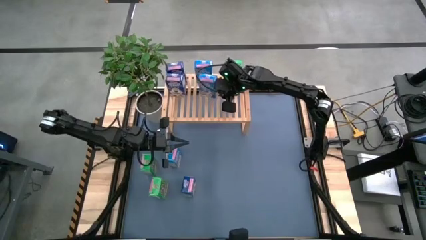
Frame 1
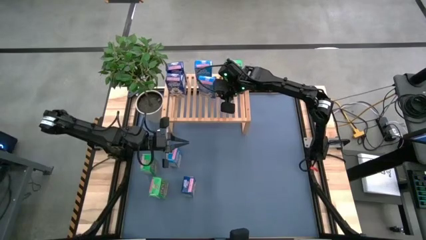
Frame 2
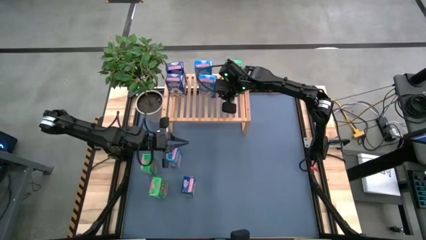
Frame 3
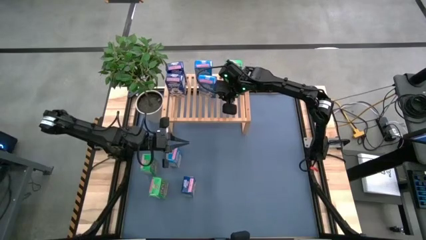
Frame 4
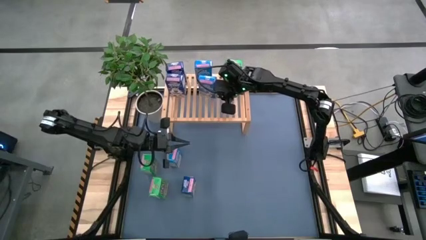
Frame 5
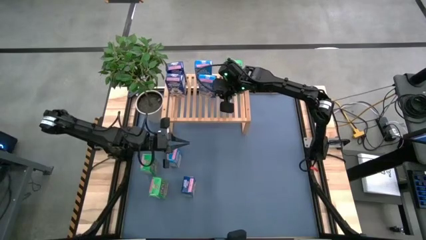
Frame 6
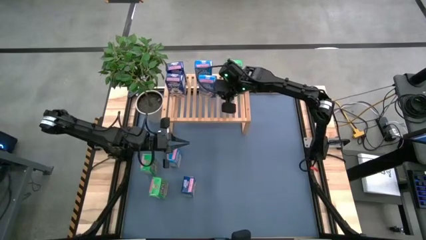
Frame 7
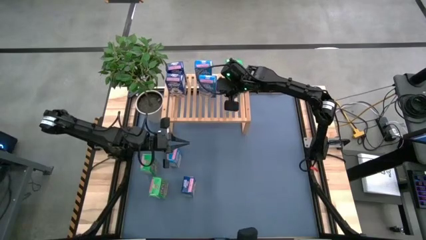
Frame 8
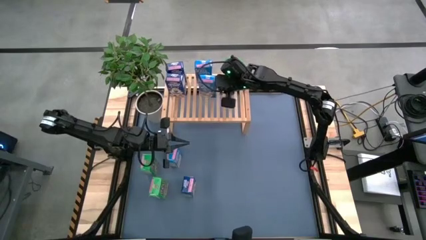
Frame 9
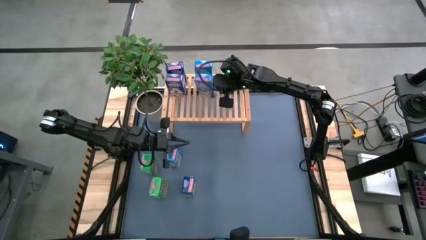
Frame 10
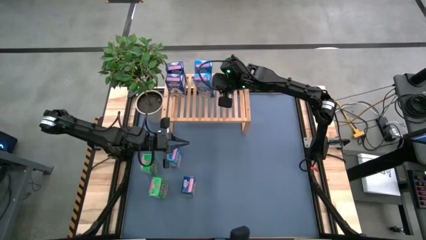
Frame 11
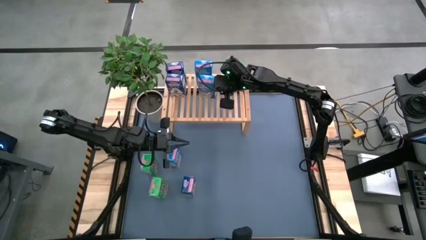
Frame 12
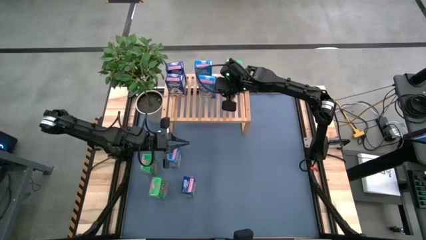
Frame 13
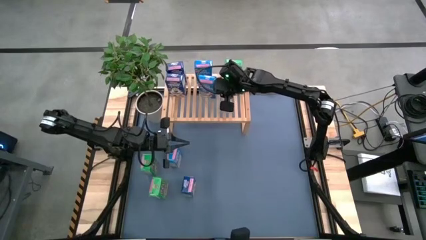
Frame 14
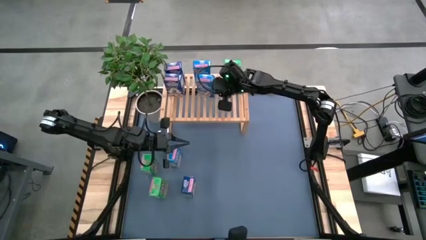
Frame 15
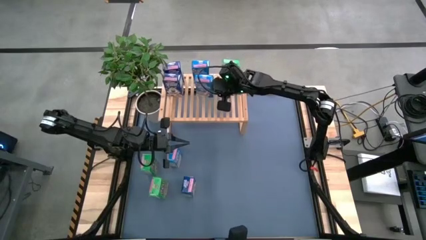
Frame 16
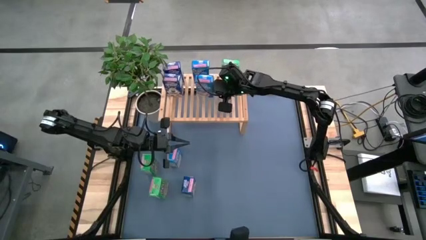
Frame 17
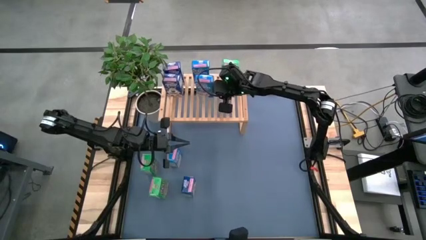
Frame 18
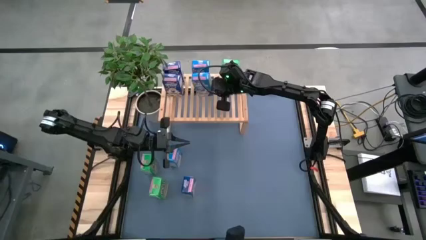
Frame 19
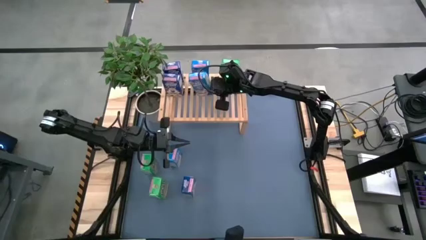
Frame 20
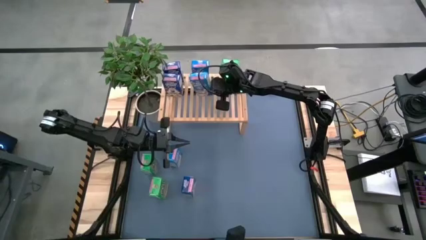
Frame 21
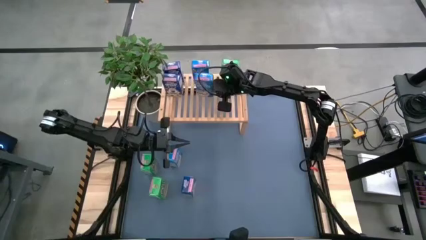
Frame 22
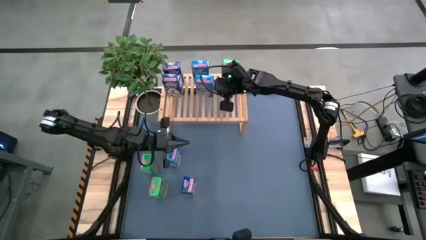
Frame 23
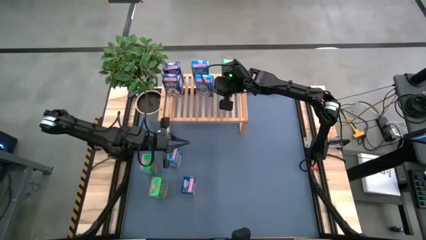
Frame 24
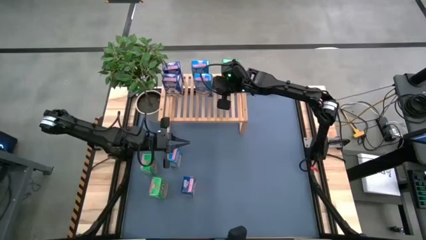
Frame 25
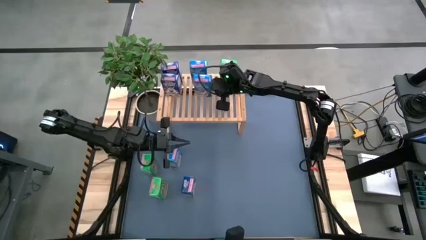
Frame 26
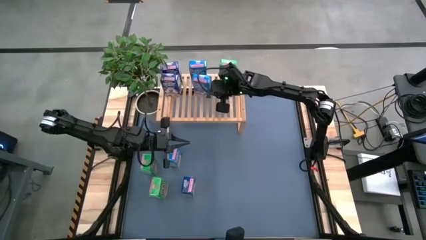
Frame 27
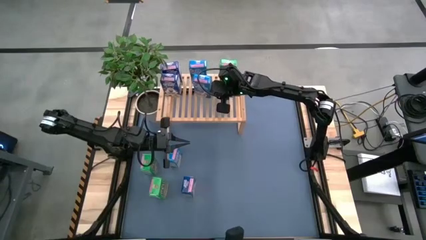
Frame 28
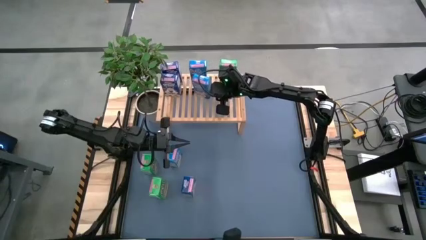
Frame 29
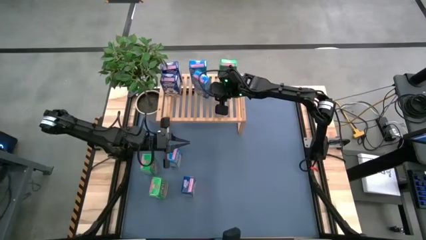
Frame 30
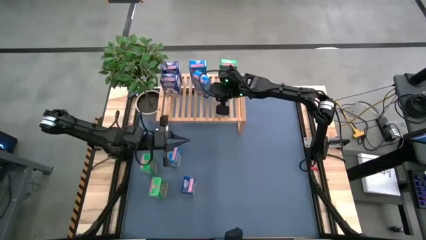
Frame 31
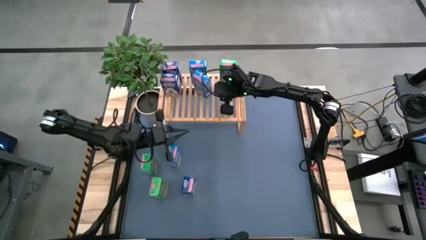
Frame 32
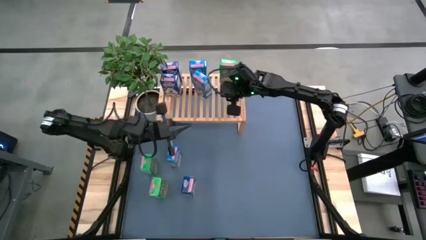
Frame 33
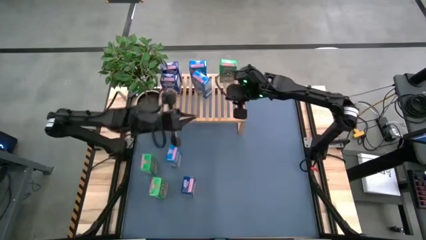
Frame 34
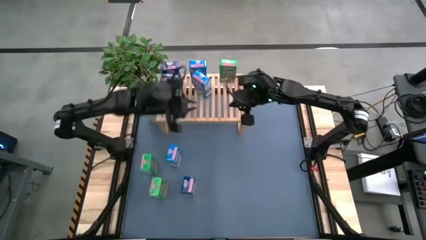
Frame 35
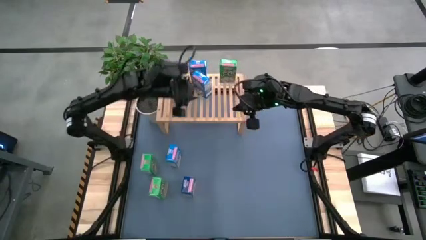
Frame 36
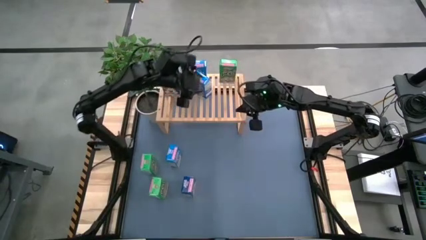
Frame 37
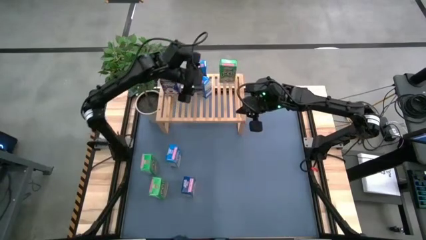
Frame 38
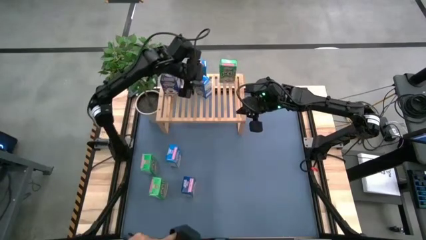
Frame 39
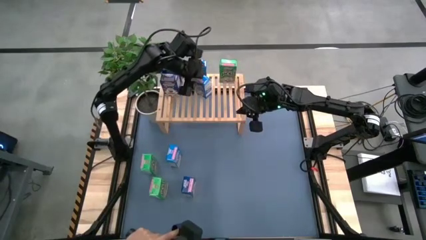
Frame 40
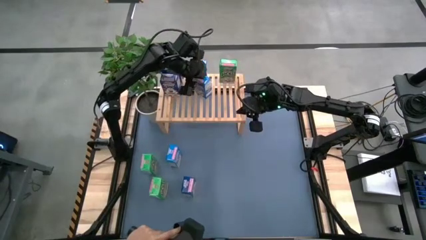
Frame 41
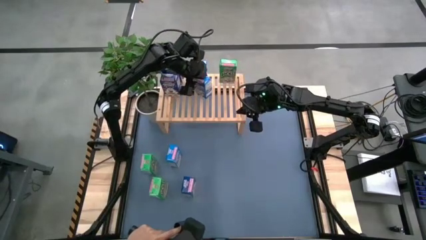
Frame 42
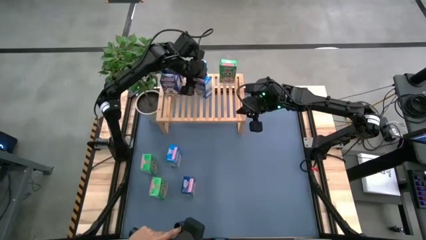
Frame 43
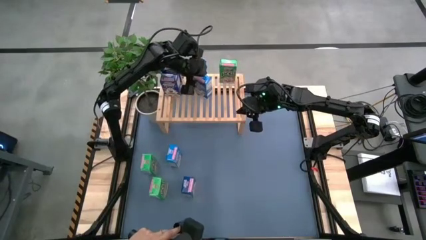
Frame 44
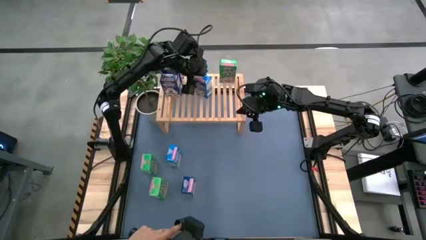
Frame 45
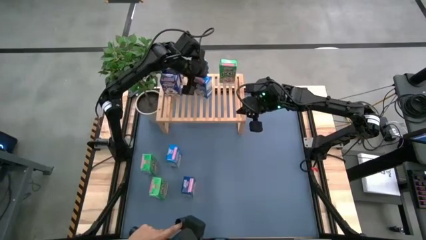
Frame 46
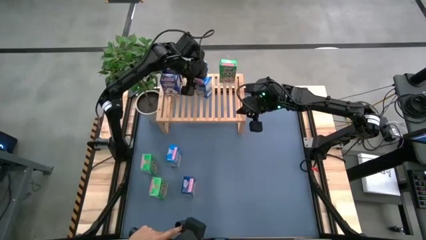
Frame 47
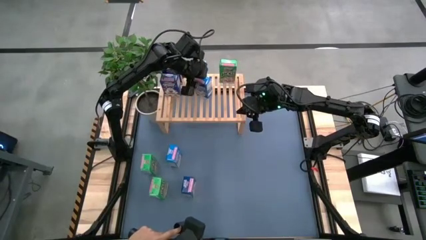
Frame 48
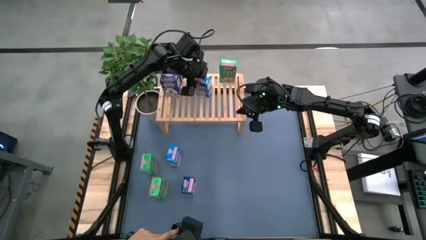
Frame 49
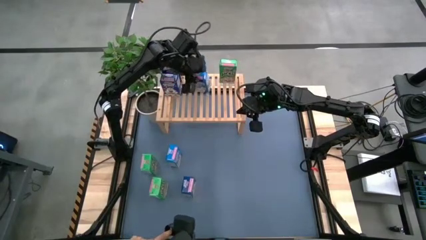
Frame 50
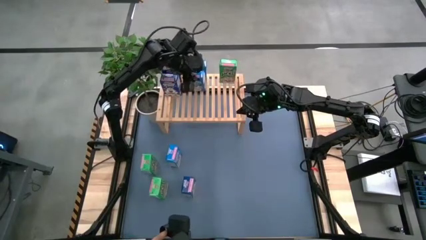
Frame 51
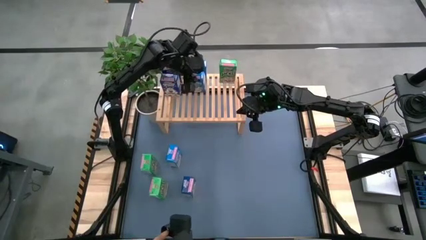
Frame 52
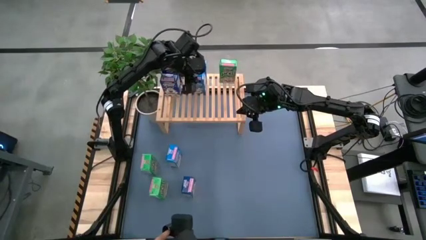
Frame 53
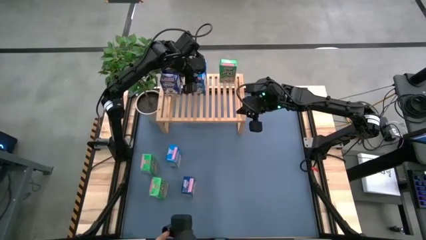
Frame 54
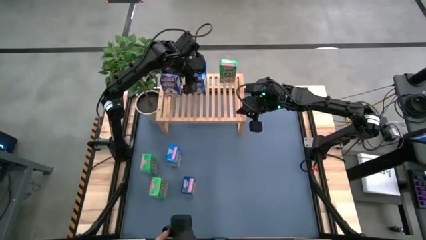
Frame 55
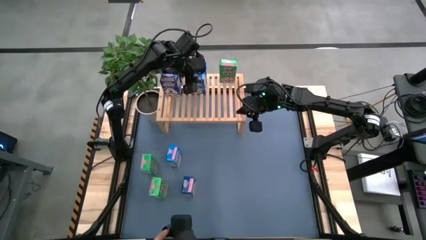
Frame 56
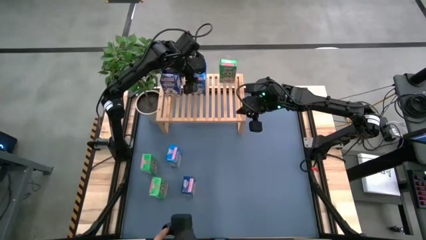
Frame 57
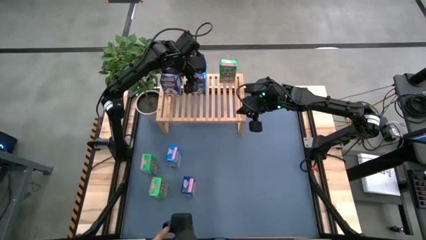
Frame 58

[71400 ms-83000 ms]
Task: Stack cereal on shelf
Put the bottom light blue cereal box on the shelf aligned with the light blue cereal box

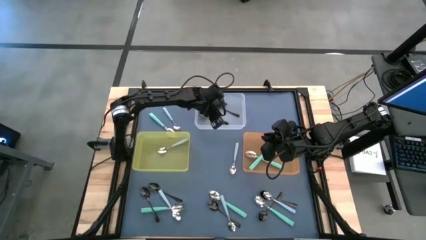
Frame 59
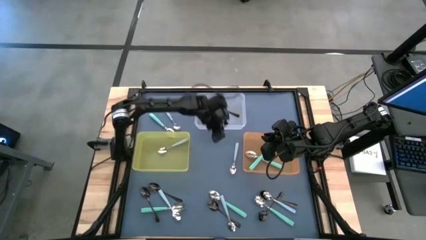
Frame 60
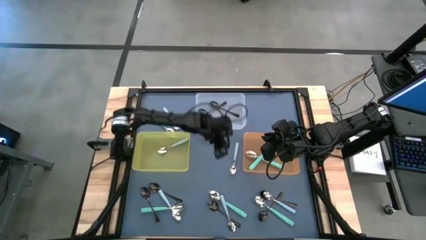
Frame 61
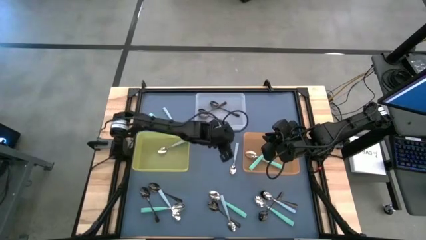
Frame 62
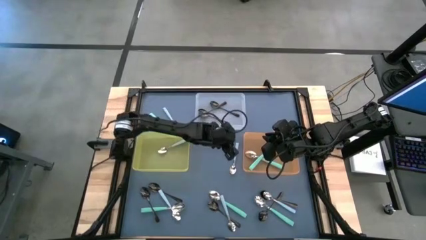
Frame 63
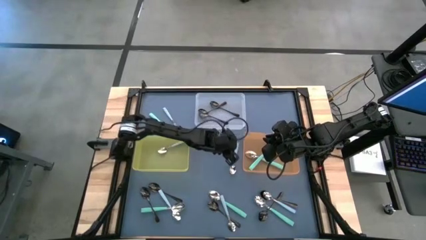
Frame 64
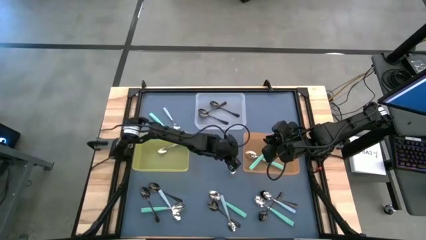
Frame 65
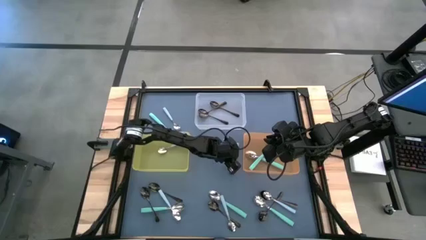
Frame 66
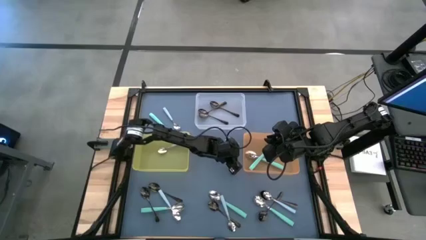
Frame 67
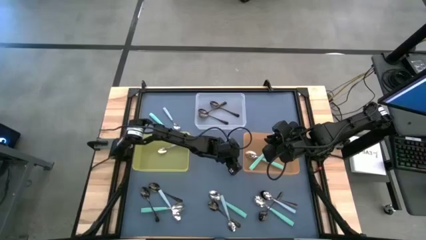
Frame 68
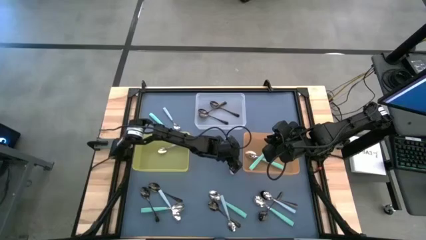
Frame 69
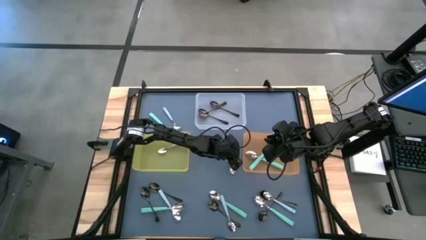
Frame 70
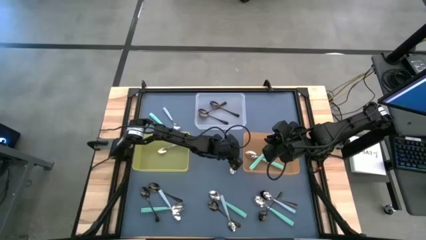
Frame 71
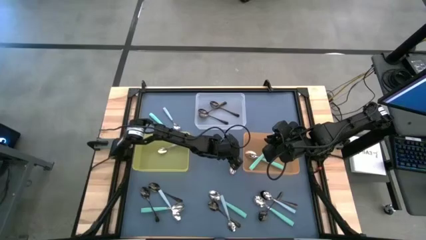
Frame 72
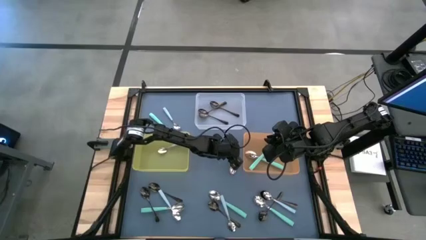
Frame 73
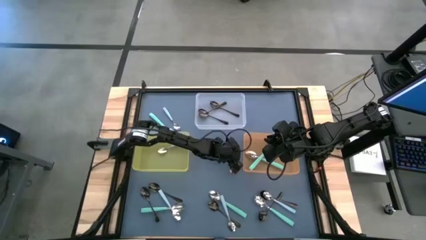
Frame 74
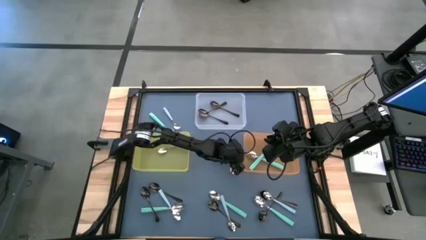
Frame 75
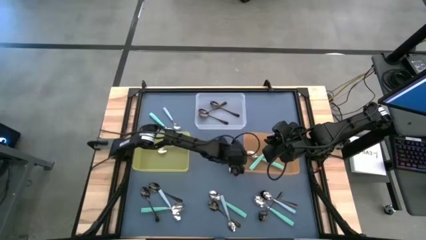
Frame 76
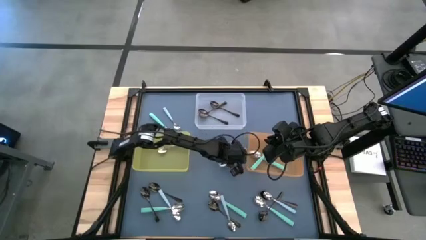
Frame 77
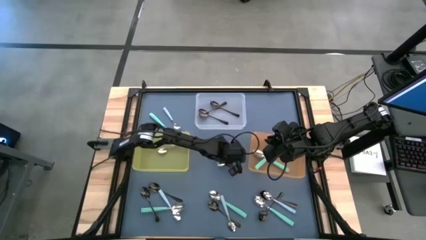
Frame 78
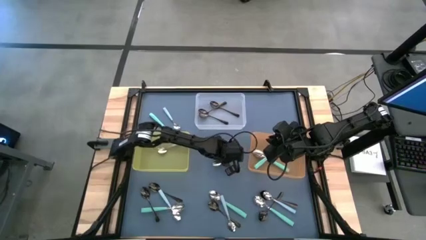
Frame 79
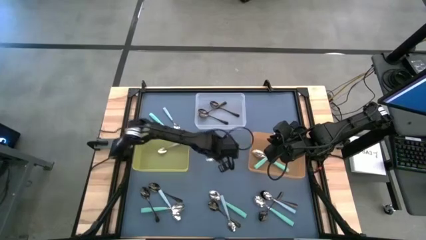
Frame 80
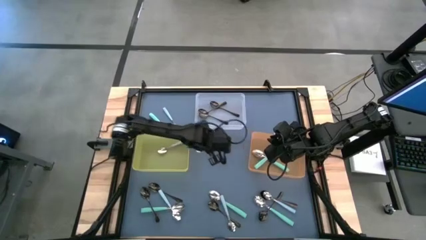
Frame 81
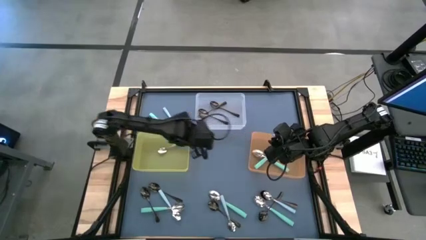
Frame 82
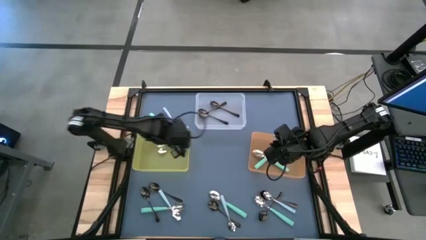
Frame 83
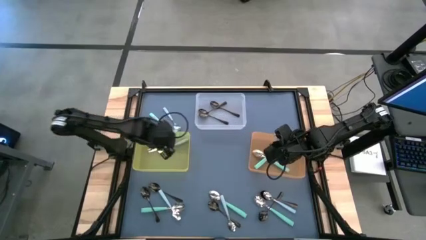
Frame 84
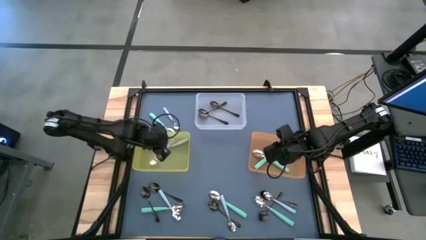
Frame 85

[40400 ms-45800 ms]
Task: Sort silverware by color (type)
Put the blue spoon into the yellow bin
